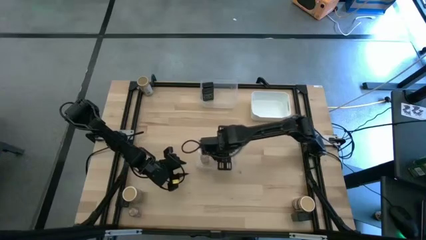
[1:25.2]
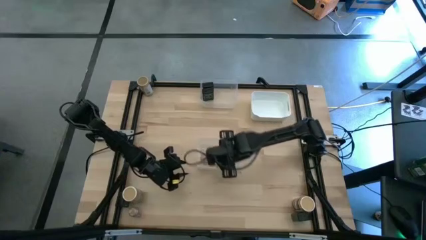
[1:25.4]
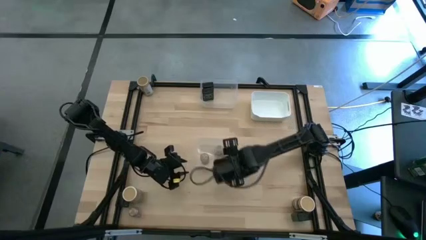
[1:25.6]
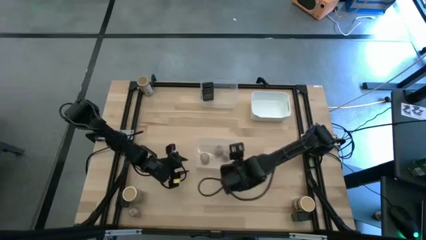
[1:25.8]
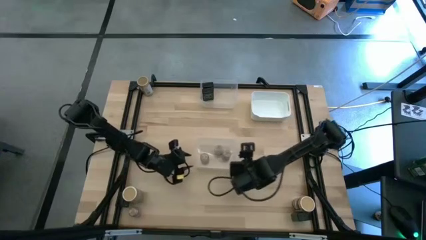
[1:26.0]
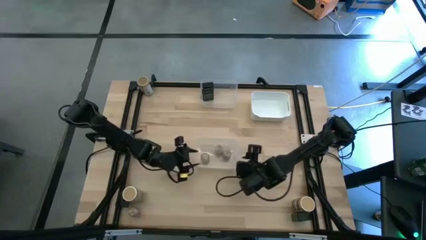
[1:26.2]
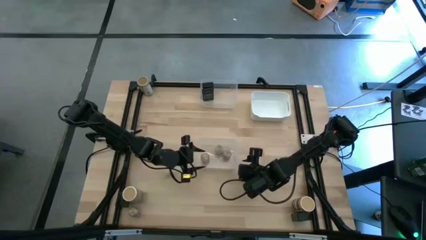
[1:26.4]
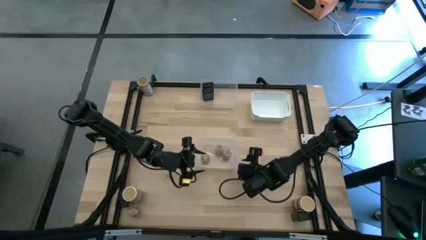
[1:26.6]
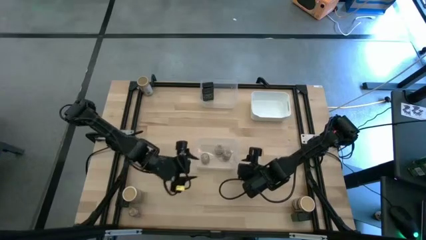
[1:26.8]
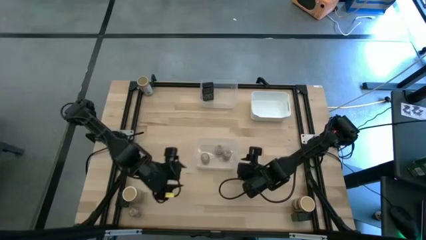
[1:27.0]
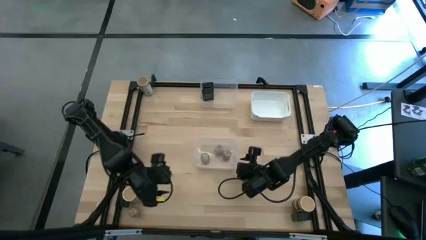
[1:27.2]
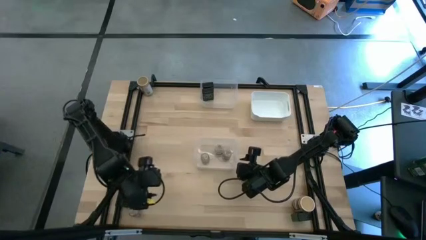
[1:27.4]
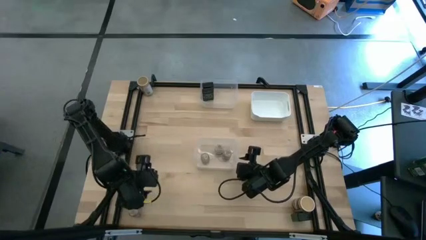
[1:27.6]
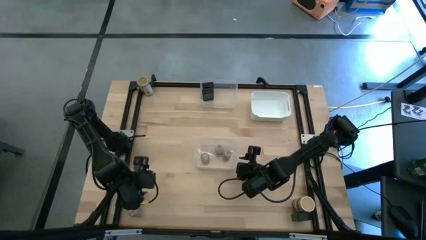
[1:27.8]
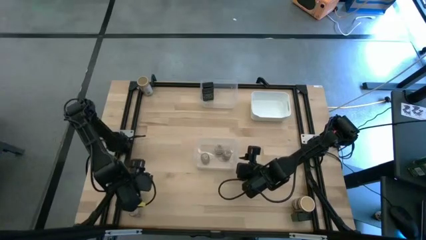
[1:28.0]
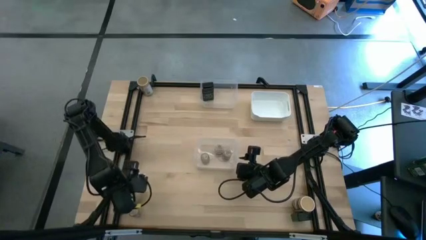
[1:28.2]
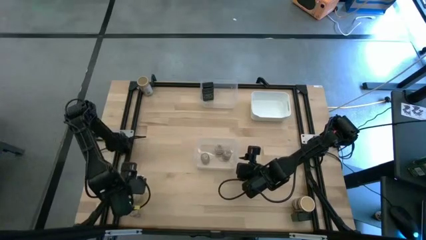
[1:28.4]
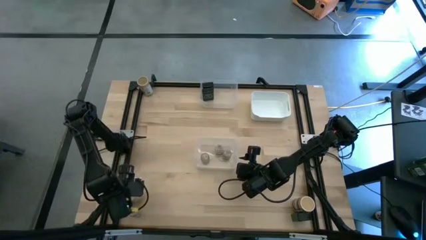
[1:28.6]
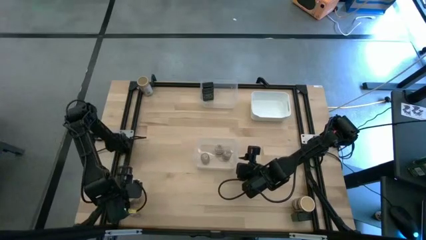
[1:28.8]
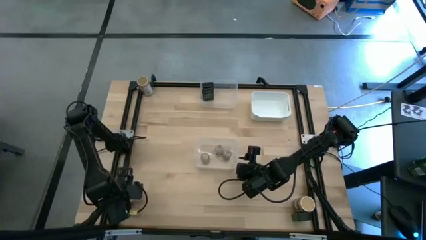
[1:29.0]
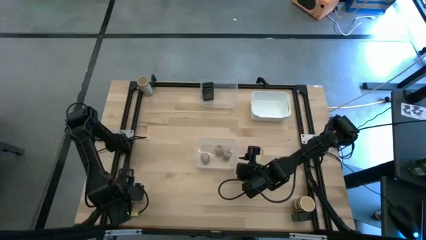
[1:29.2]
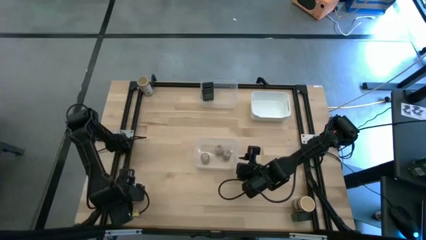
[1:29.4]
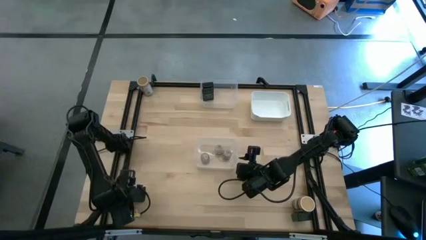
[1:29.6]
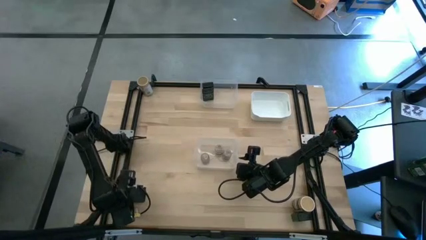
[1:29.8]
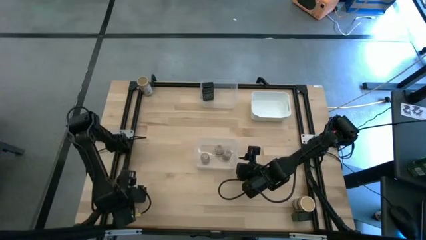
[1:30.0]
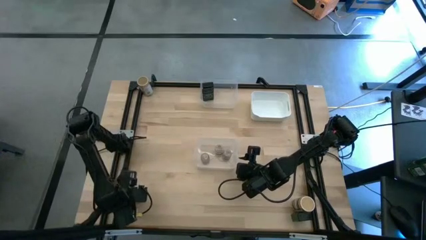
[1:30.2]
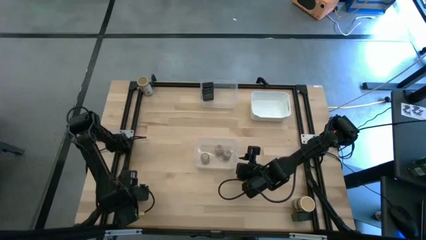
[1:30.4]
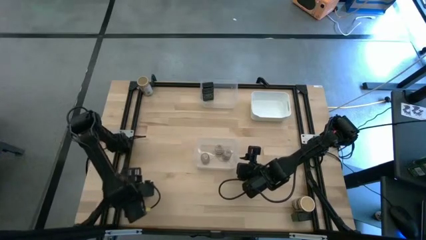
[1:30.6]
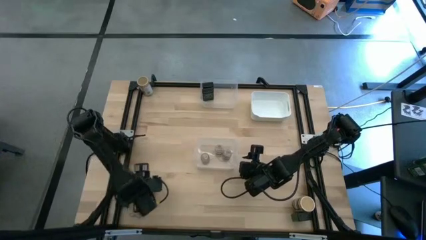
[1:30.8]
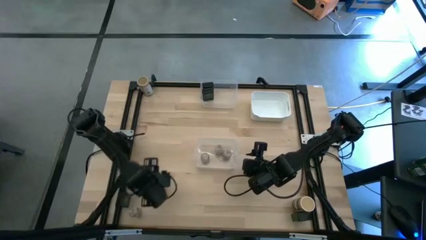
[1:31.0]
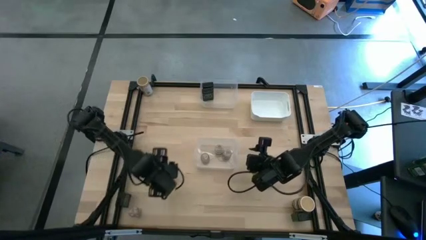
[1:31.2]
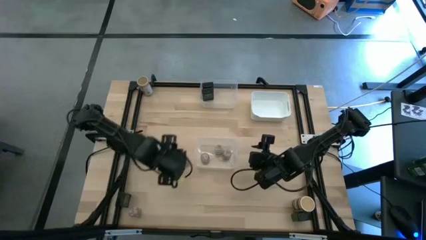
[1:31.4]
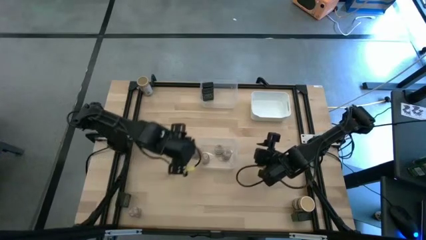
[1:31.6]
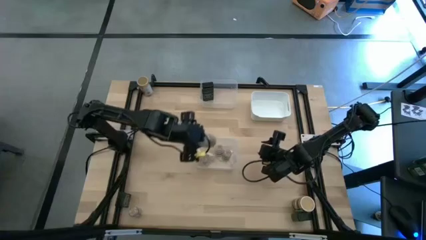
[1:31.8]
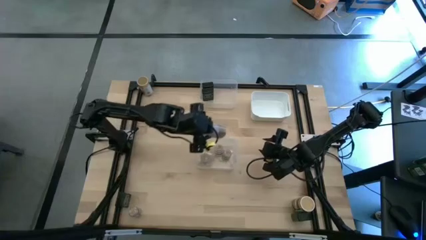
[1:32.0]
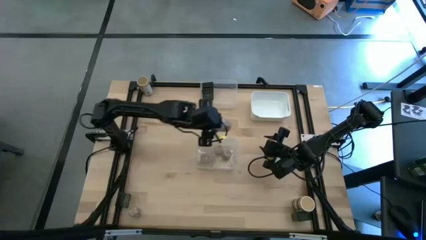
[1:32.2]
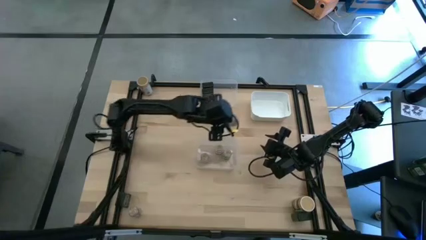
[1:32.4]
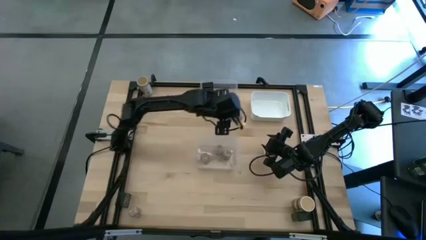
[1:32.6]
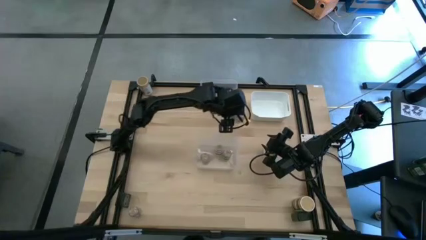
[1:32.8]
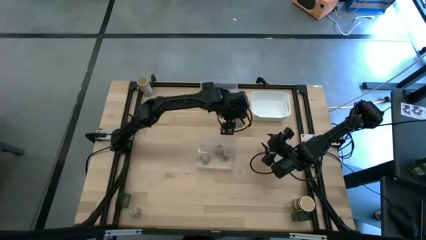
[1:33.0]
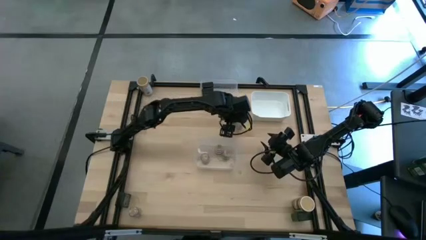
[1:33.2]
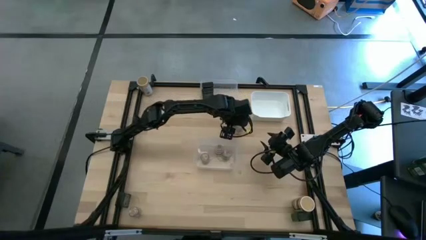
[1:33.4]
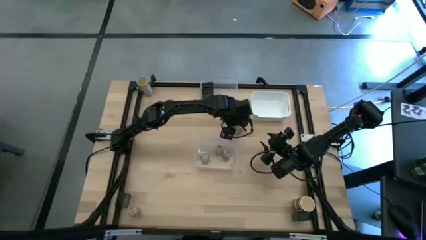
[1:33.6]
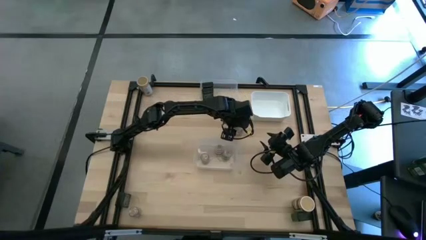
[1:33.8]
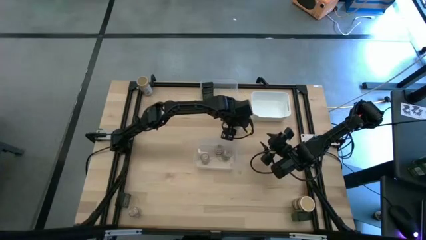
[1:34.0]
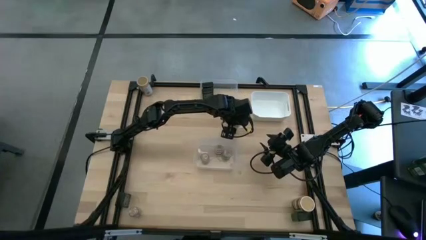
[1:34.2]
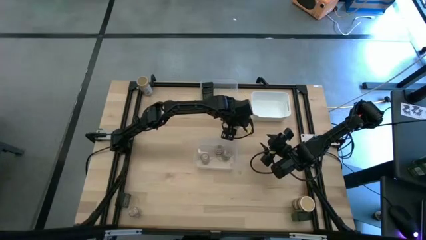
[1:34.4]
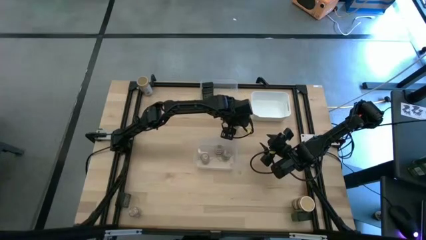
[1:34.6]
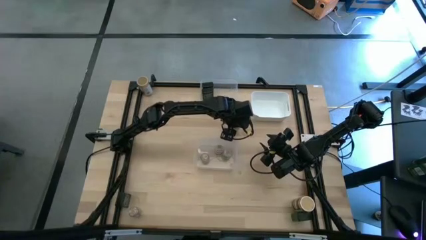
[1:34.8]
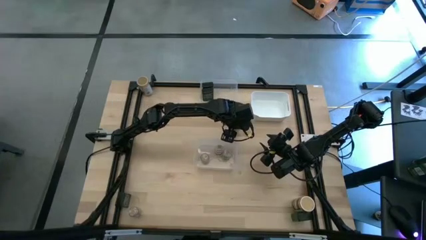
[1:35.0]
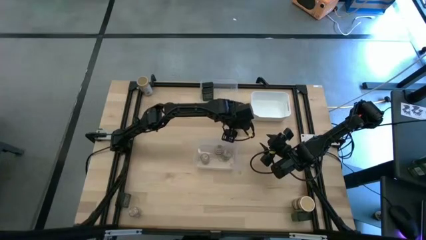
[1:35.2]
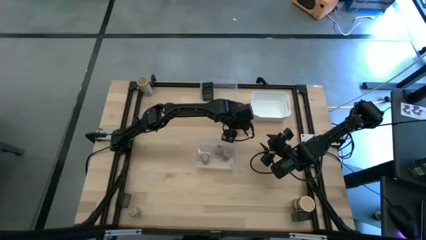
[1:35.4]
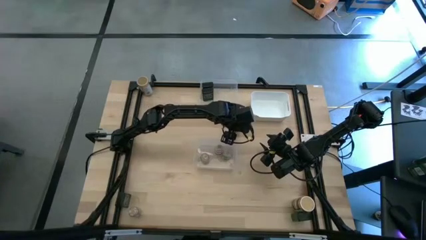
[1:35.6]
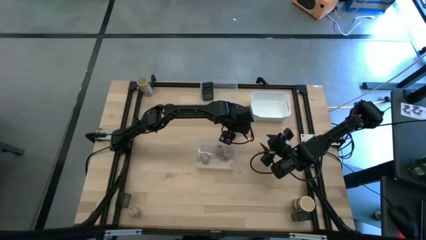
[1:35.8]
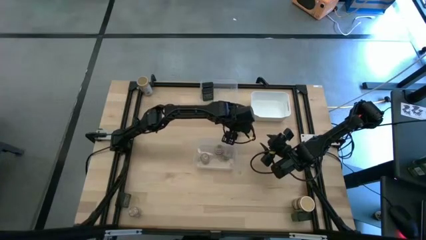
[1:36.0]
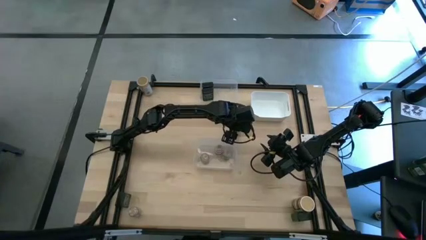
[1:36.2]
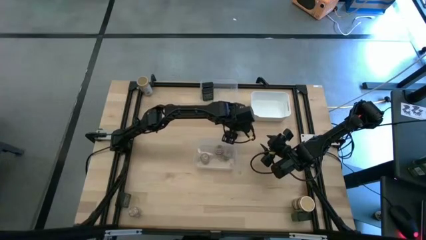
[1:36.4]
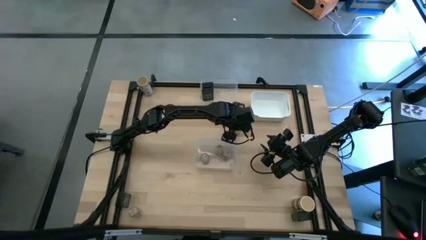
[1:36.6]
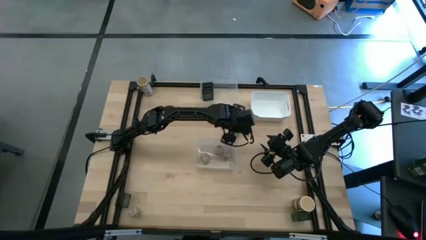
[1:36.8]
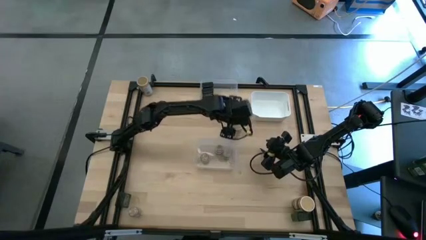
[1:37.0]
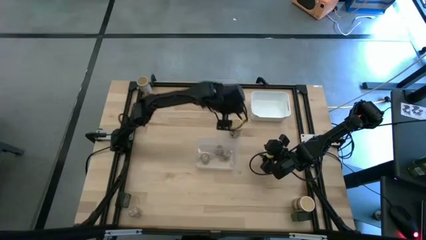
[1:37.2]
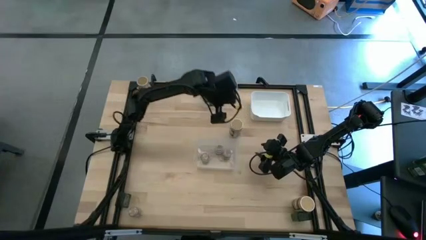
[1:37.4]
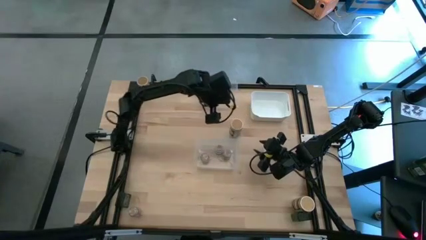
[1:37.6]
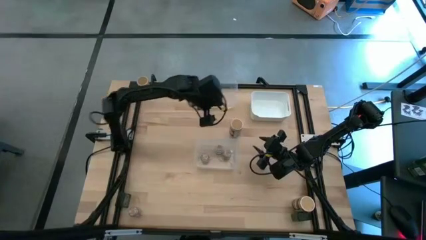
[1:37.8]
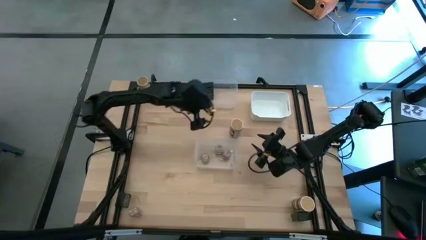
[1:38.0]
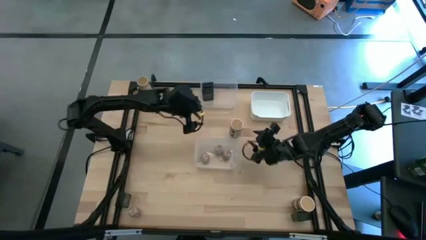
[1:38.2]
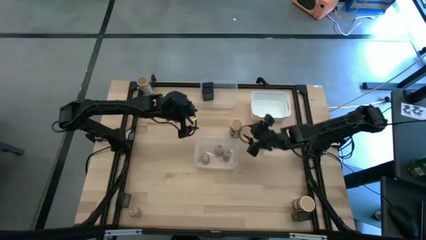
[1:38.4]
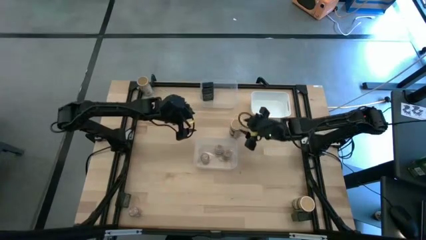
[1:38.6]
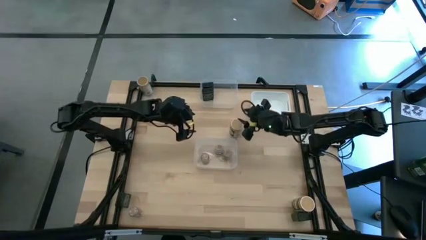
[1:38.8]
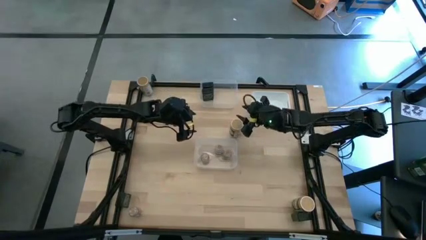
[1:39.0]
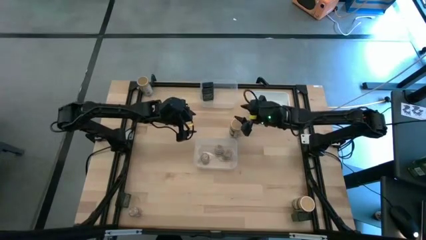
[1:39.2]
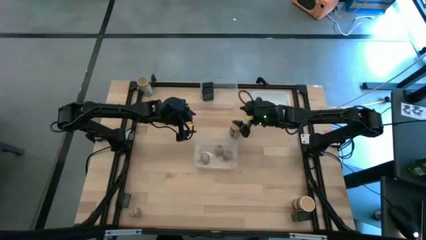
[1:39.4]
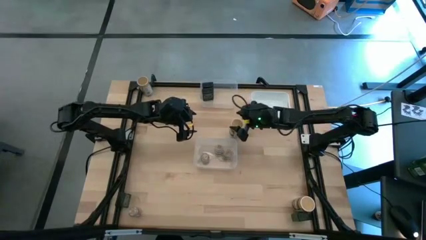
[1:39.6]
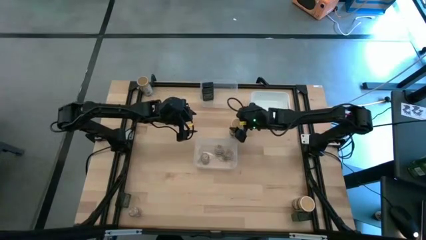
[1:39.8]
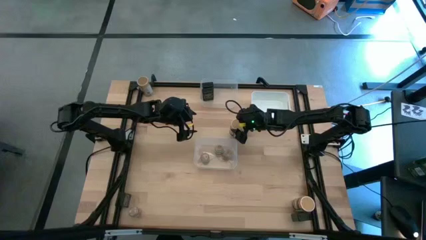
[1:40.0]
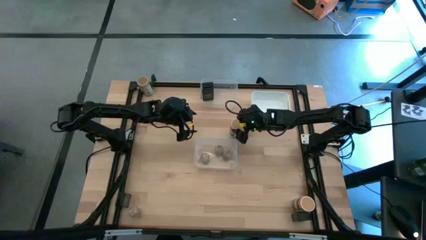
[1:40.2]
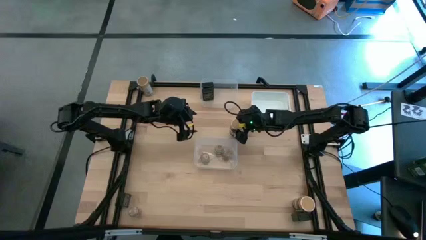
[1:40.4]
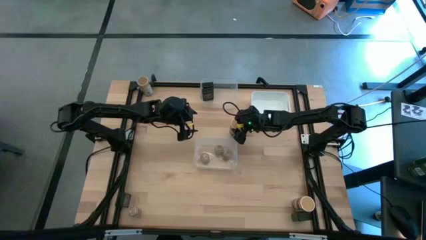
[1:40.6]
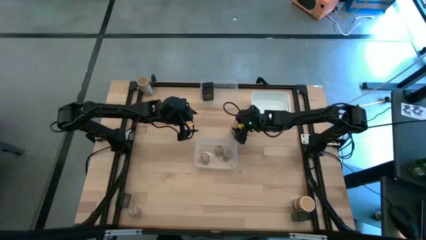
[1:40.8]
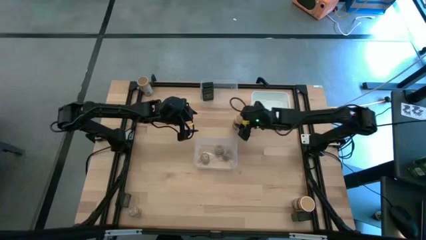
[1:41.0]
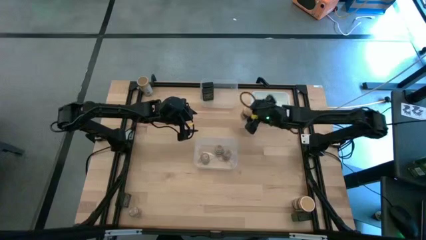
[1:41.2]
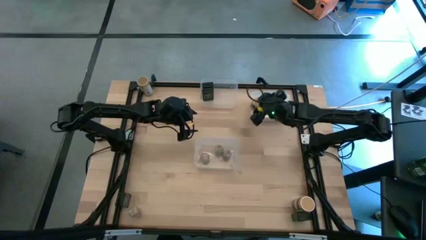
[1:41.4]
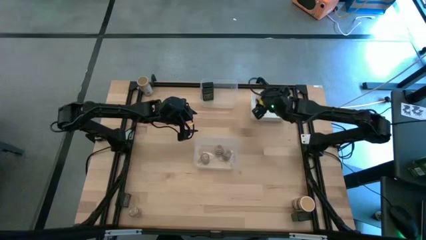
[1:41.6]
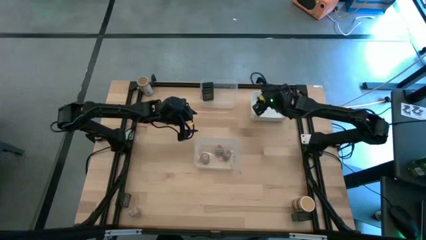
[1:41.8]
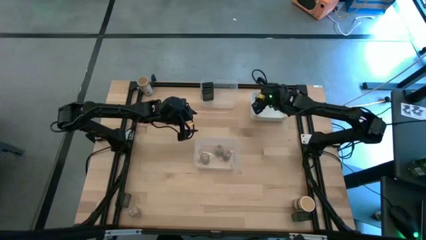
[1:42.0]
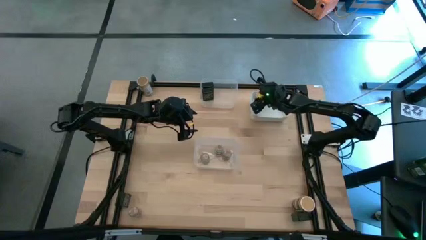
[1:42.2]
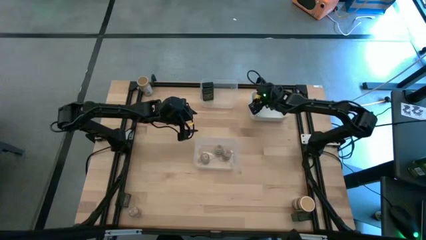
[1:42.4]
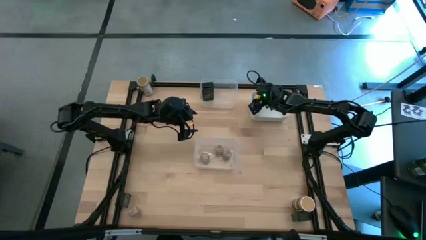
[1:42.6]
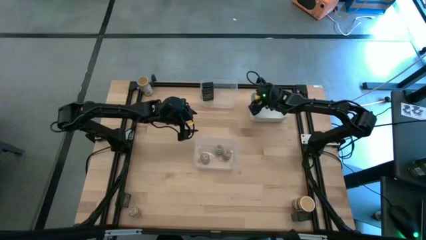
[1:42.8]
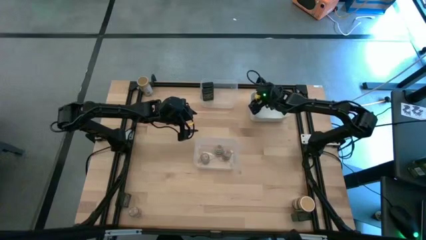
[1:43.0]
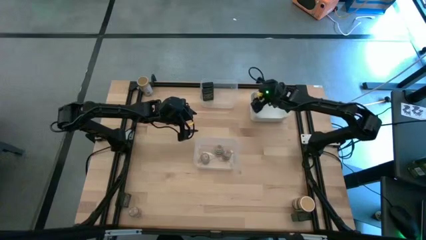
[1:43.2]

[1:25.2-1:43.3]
Task: Sort spices by type
Put the bottom left brown seasoning bottle into the white bin
